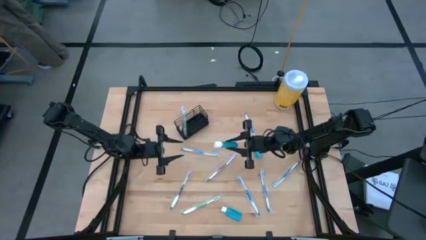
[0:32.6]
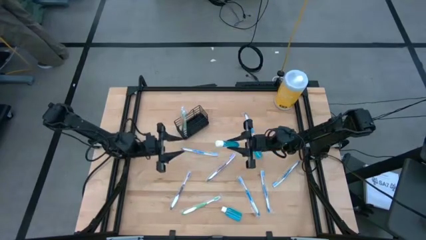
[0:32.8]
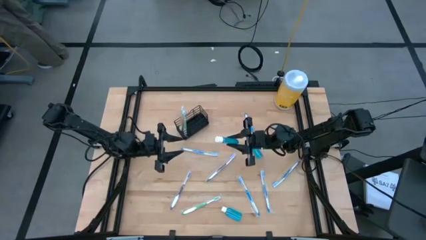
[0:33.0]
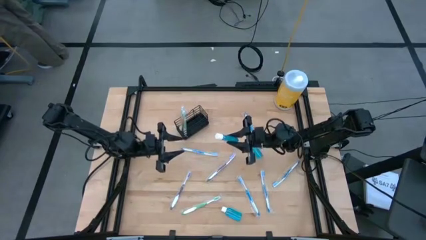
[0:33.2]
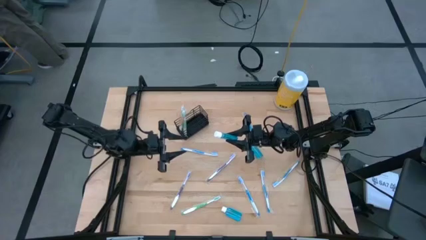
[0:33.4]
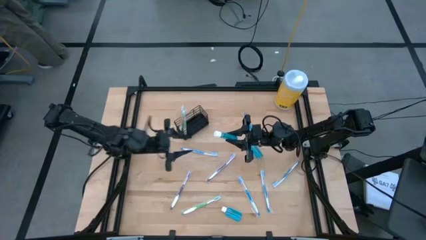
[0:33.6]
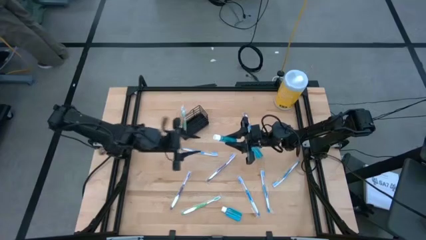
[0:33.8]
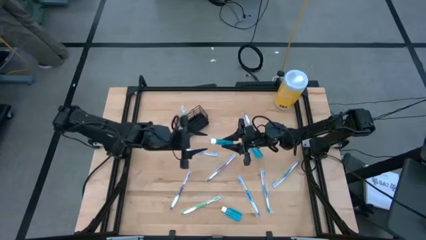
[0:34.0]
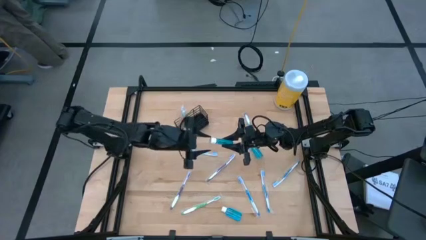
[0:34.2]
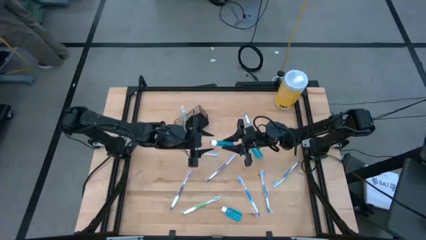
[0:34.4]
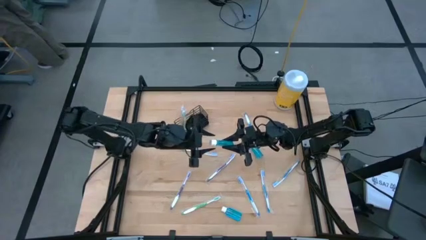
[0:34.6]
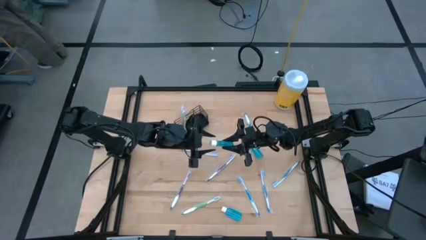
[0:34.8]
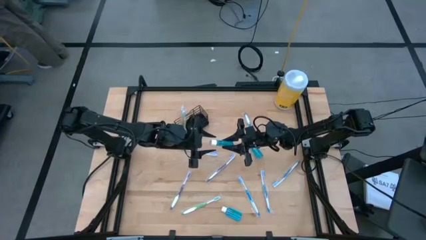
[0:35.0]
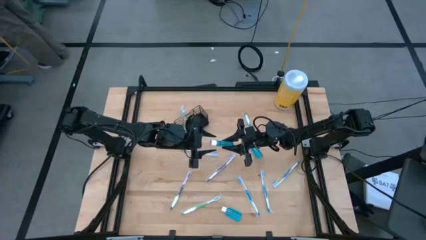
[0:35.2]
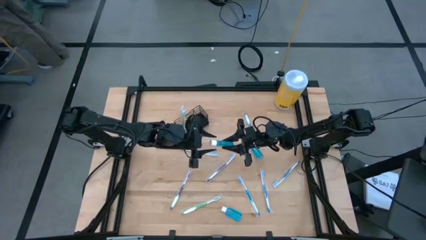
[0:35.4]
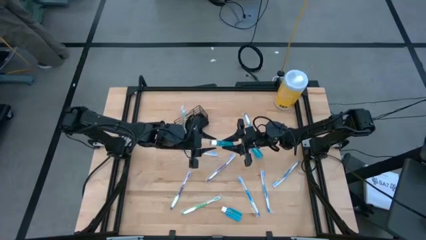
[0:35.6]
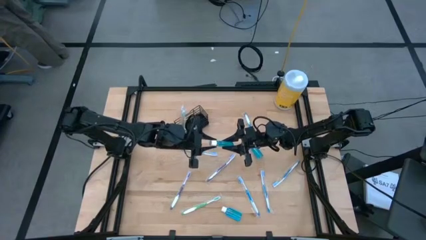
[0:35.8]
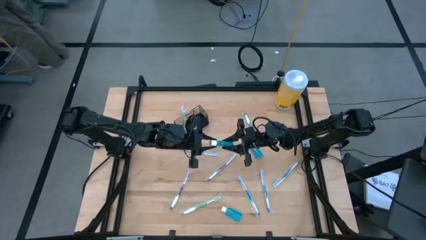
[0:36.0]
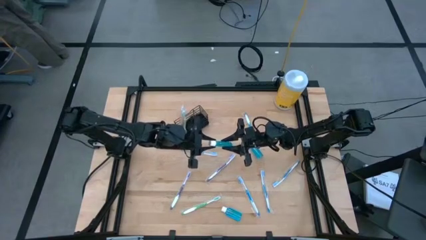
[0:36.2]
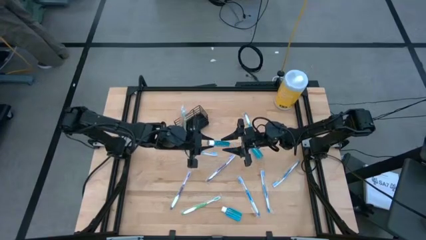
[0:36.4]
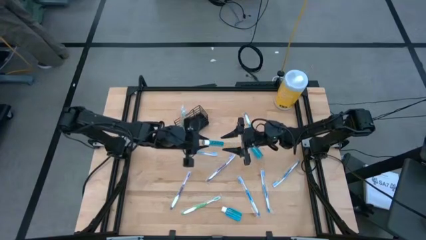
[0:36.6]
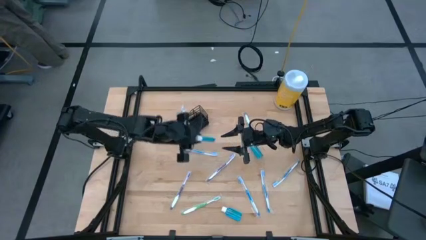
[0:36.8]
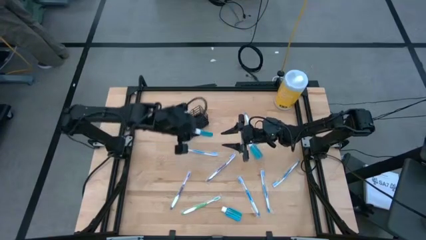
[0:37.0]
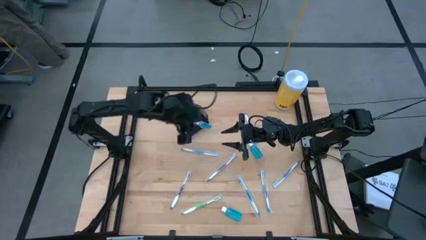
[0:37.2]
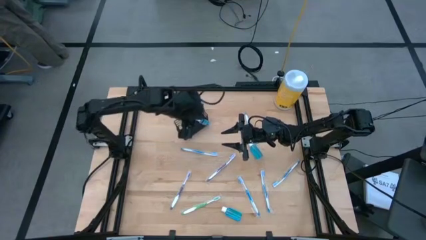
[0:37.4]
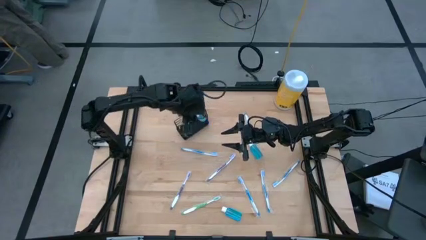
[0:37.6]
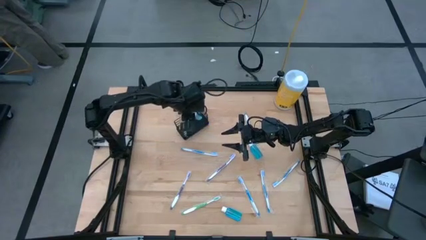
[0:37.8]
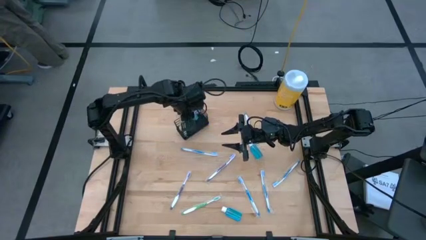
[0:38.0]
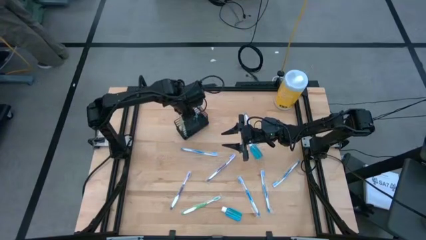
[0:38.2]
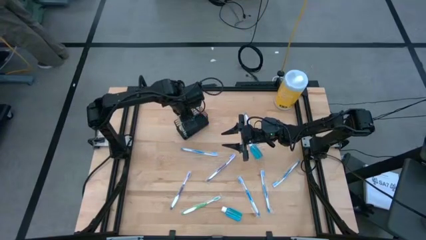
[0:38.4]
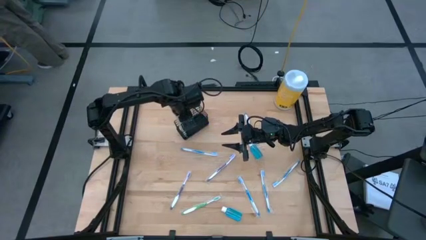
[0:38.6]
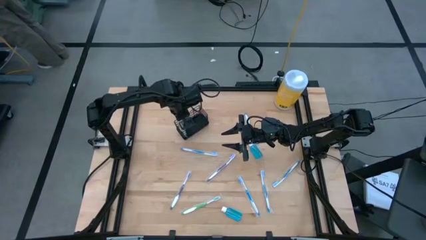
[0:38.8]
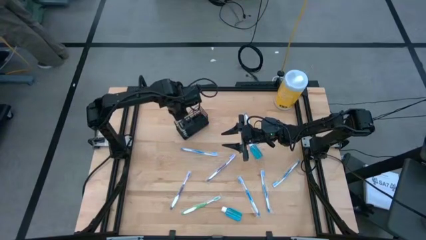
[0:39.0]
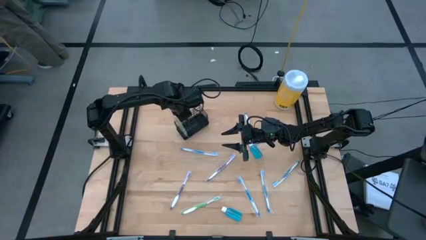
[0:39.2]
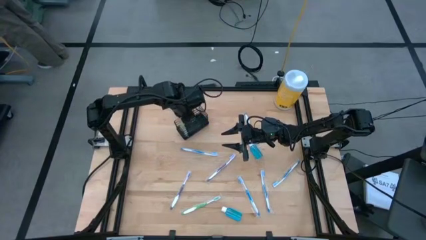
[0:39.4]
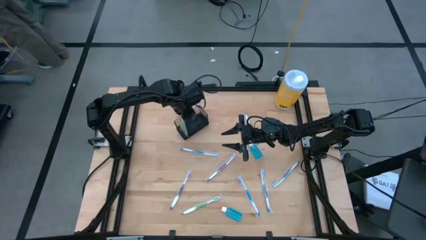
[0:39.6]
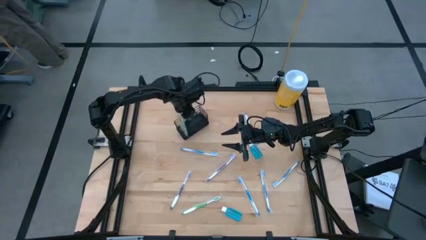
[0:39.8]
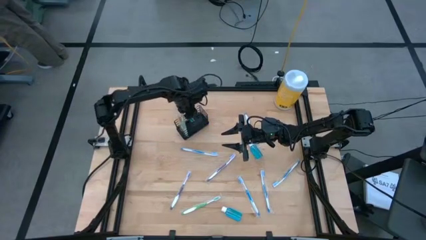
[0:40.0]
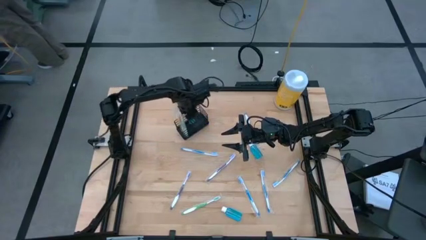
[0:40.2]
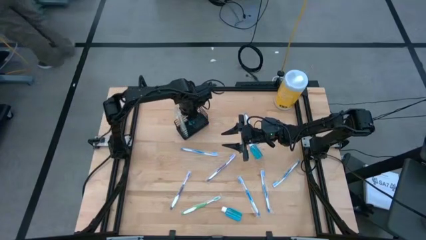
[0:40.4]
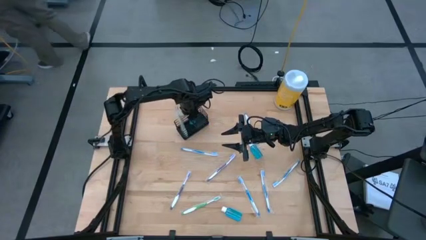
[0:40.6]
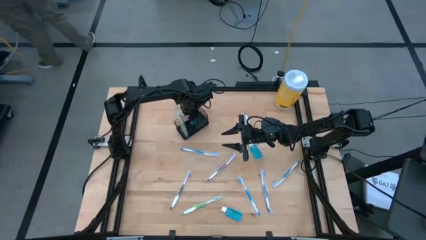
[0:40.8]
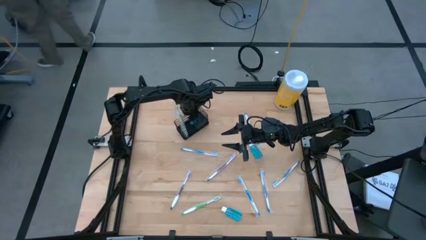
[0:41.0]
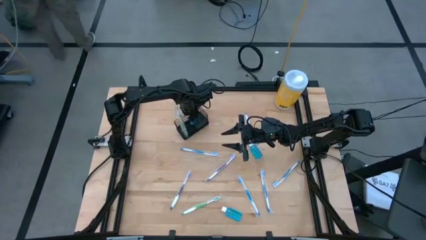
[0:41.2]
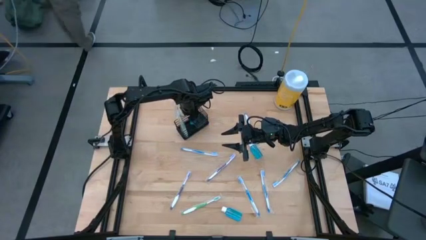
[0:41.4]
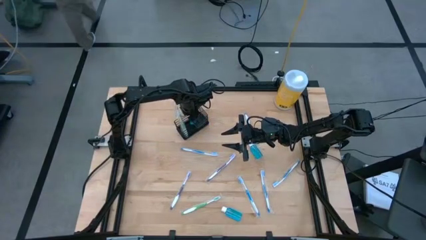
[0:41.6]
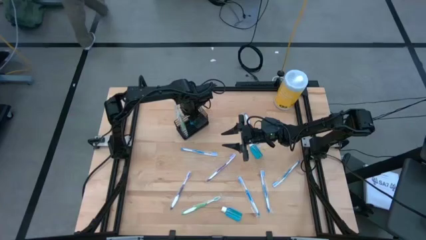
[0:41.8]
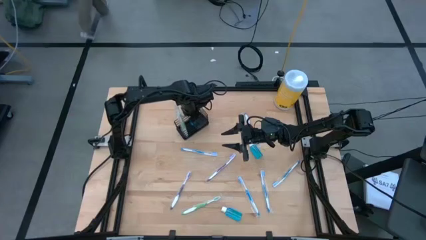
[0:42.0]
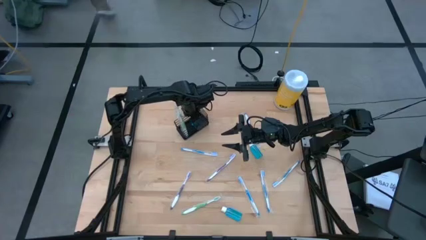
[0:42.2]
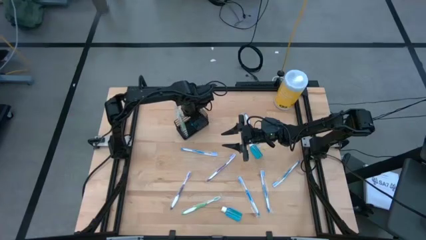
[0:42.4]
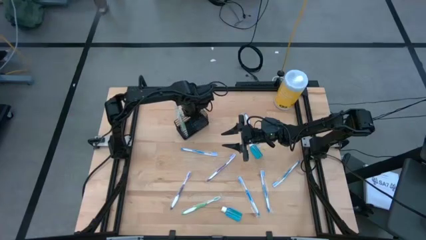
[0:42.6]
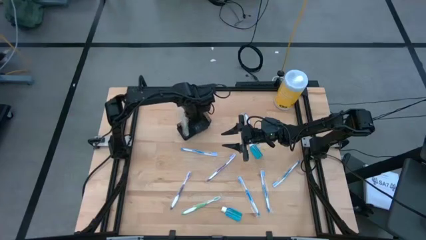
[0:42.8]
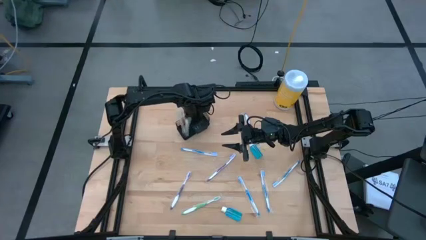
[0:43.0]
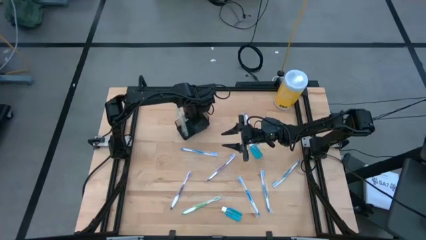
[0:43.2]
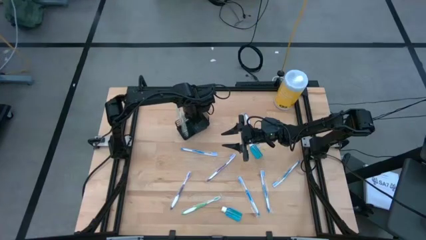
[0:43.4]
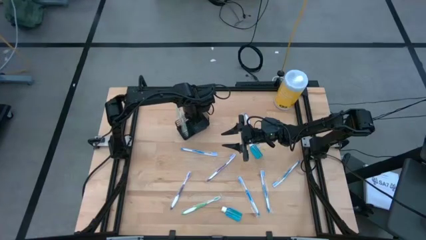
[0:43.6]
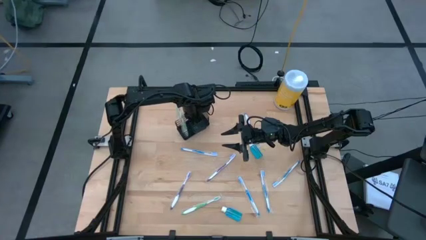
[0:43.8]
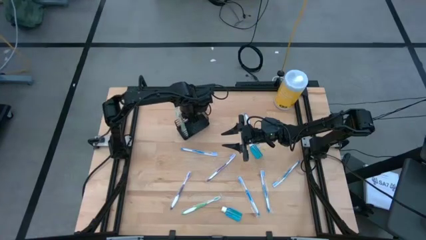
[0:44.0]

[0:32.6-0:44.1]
Task: Pick & Place toothbrushing station
Put the mouthwash into the black wire organizer
